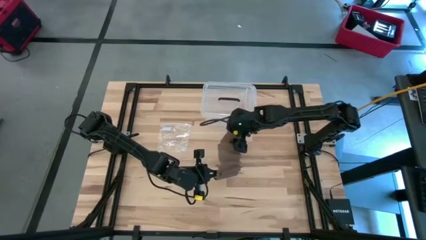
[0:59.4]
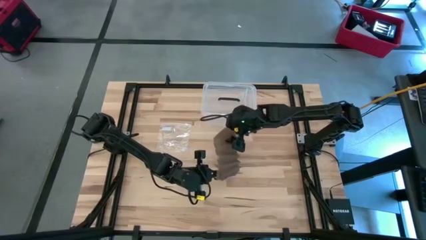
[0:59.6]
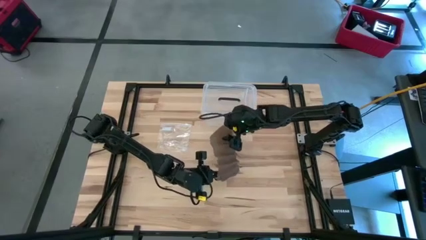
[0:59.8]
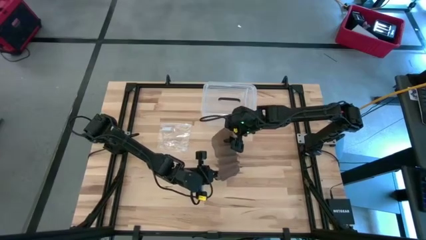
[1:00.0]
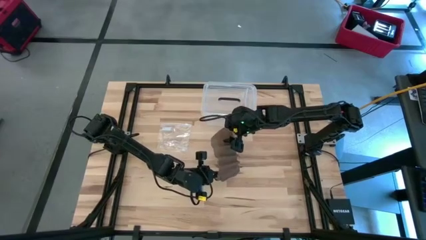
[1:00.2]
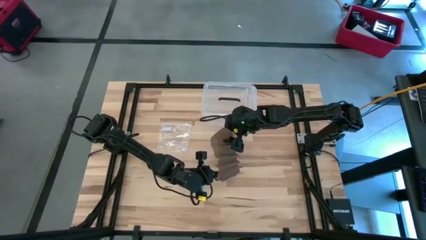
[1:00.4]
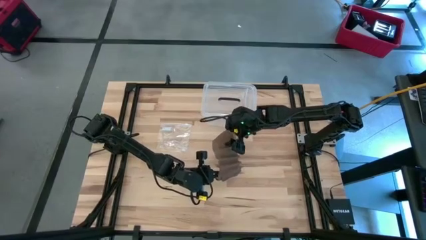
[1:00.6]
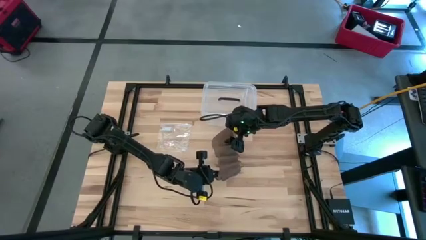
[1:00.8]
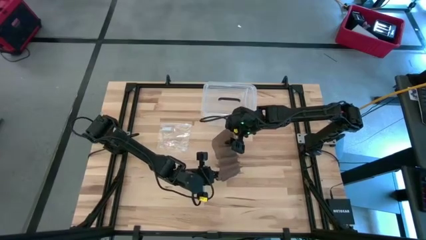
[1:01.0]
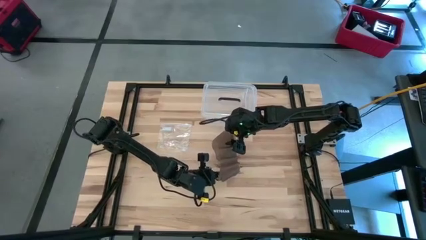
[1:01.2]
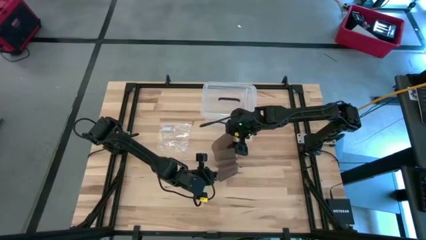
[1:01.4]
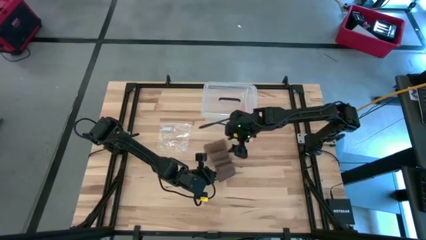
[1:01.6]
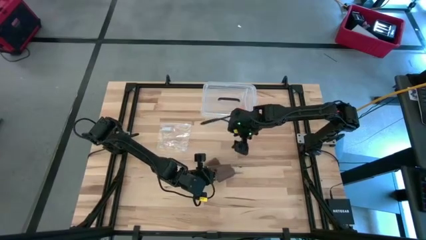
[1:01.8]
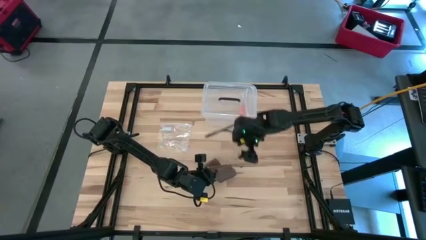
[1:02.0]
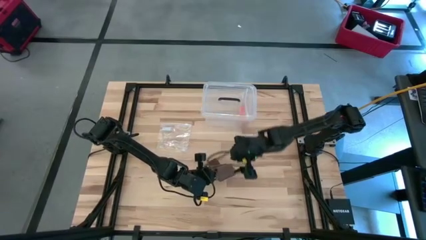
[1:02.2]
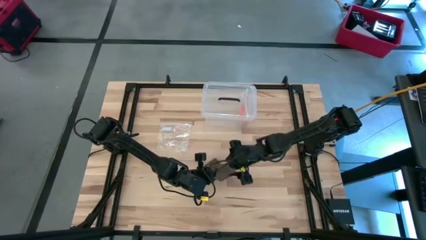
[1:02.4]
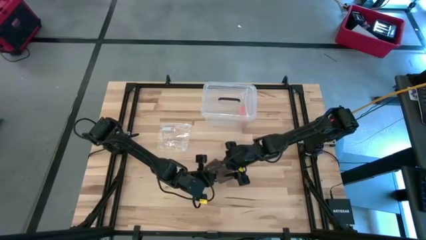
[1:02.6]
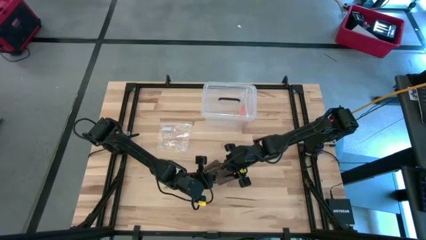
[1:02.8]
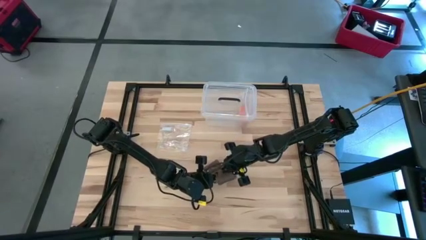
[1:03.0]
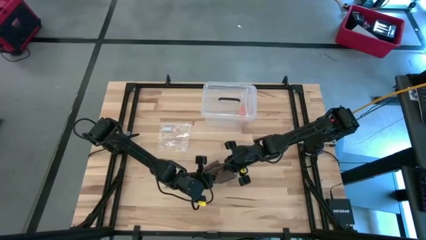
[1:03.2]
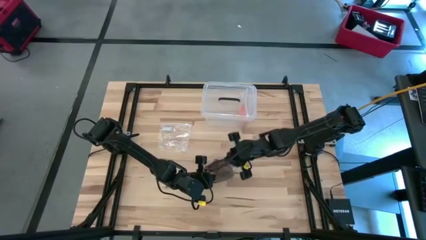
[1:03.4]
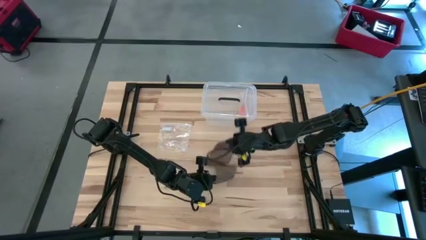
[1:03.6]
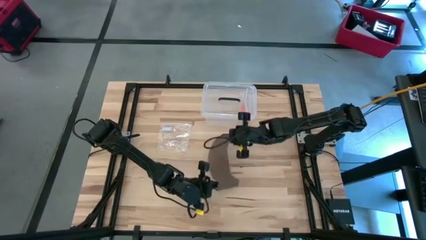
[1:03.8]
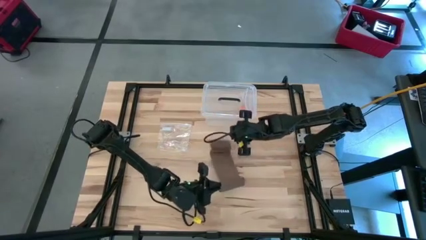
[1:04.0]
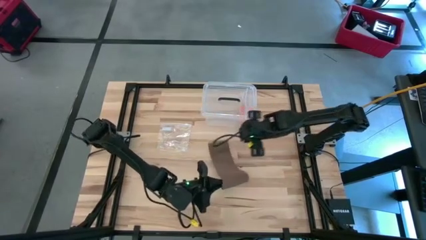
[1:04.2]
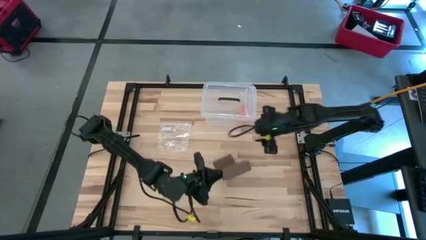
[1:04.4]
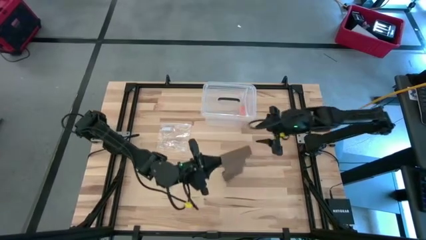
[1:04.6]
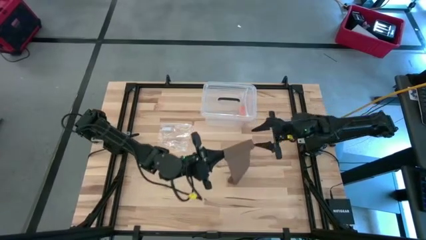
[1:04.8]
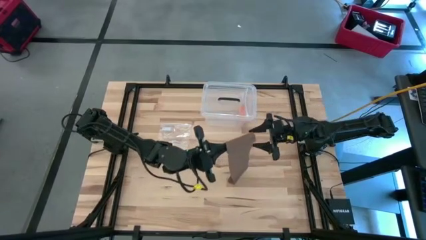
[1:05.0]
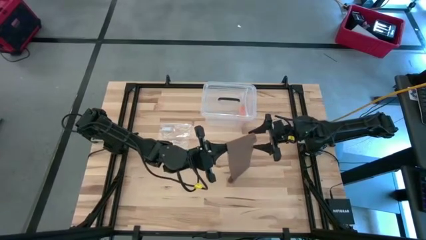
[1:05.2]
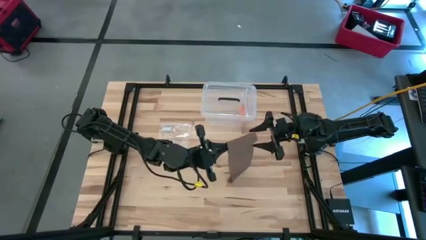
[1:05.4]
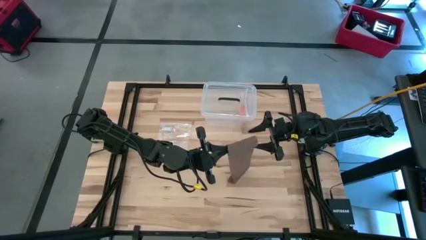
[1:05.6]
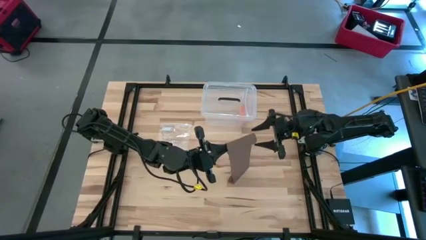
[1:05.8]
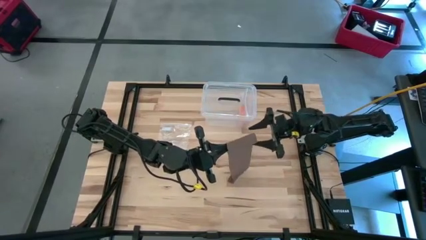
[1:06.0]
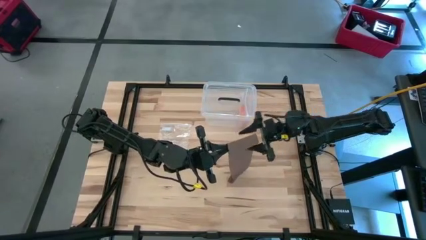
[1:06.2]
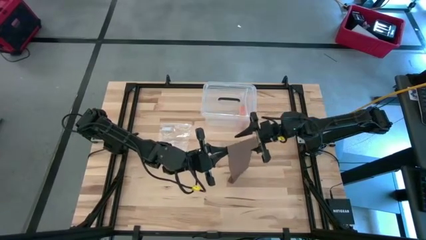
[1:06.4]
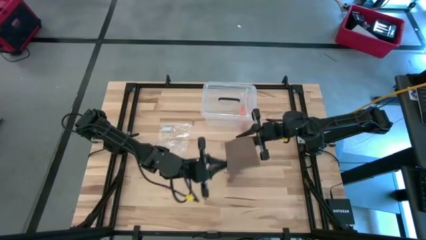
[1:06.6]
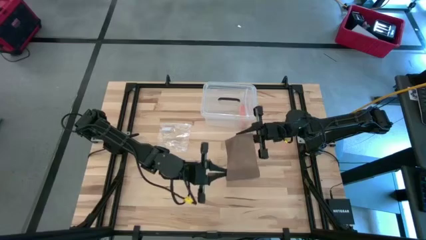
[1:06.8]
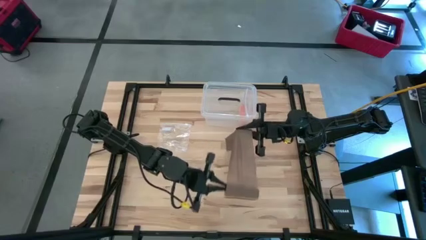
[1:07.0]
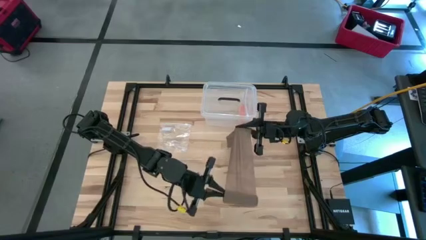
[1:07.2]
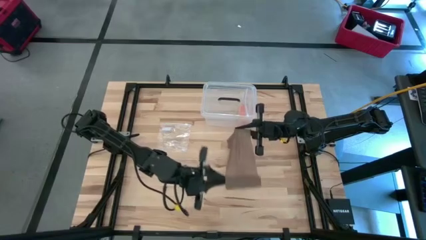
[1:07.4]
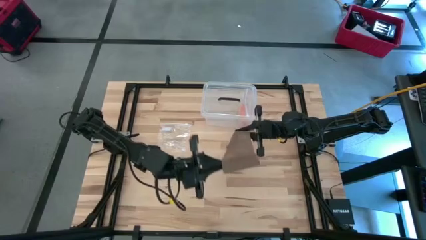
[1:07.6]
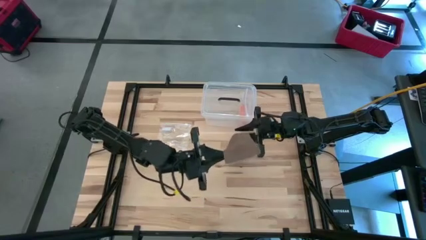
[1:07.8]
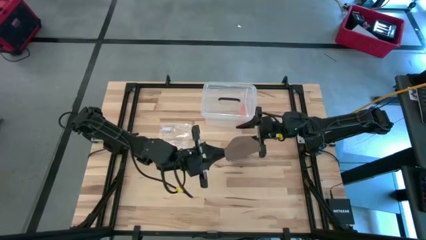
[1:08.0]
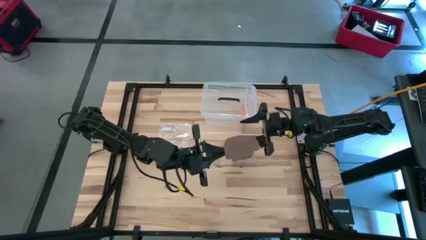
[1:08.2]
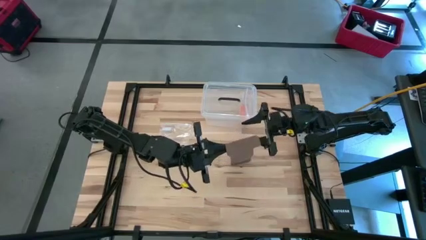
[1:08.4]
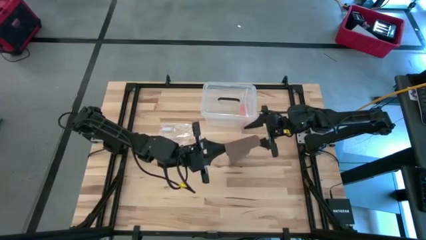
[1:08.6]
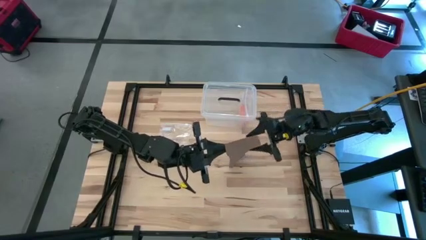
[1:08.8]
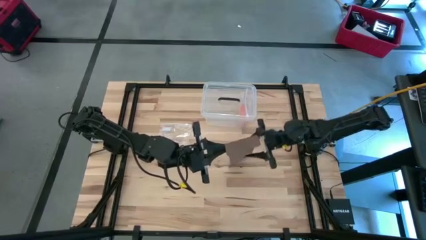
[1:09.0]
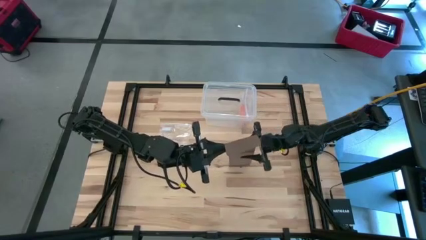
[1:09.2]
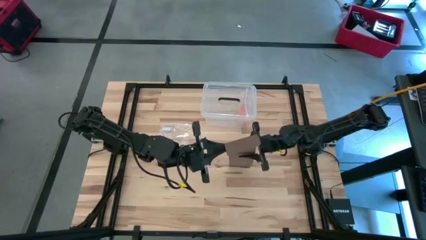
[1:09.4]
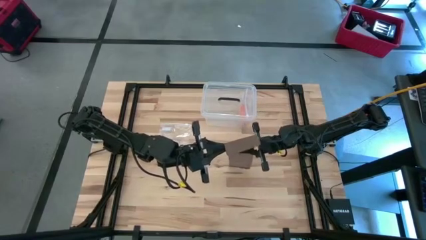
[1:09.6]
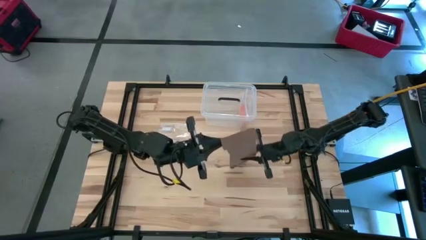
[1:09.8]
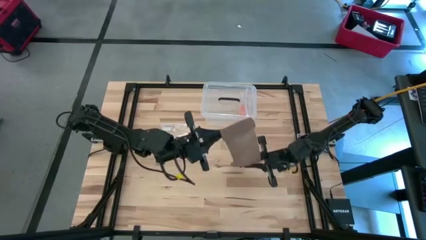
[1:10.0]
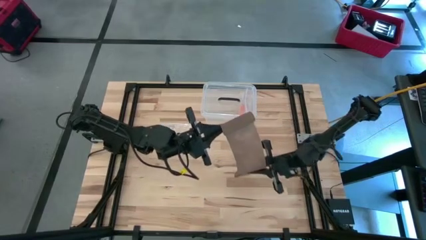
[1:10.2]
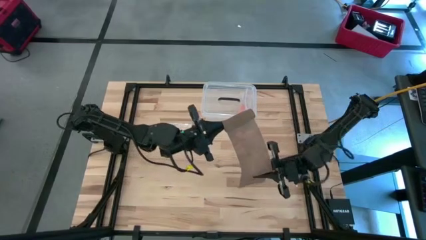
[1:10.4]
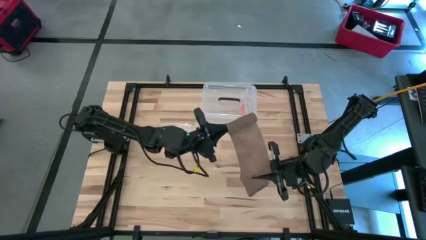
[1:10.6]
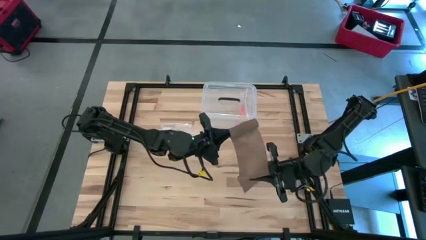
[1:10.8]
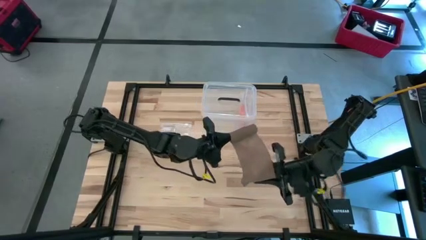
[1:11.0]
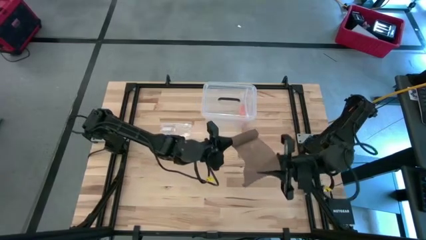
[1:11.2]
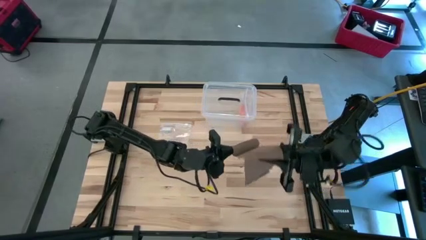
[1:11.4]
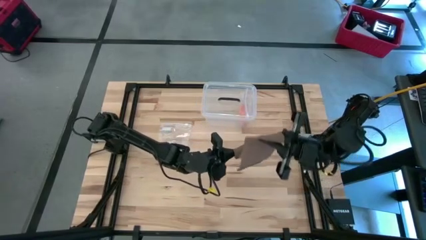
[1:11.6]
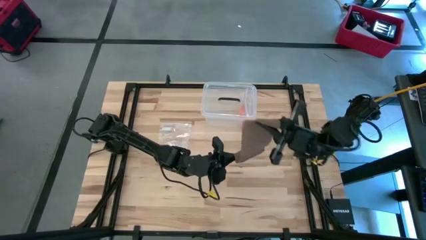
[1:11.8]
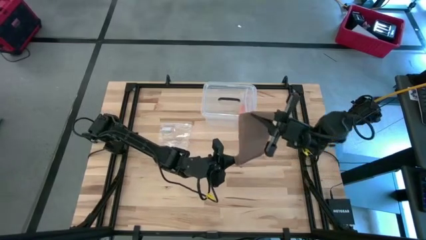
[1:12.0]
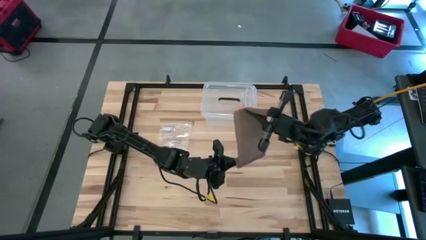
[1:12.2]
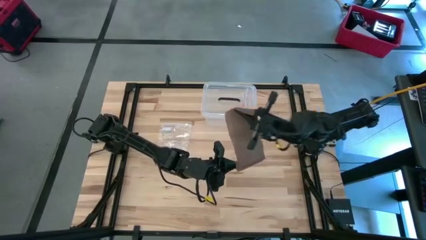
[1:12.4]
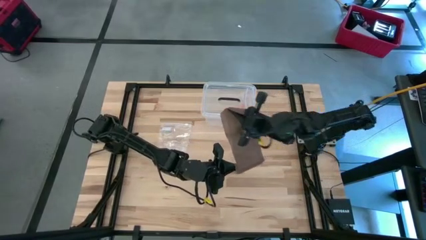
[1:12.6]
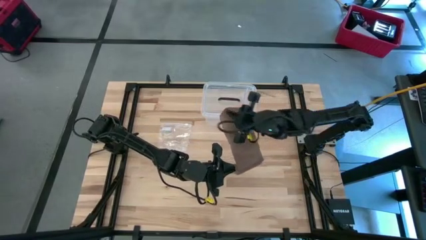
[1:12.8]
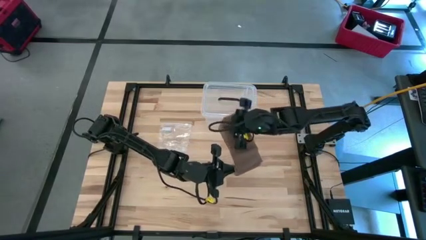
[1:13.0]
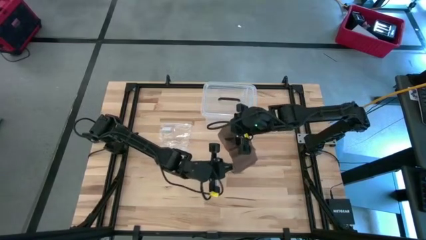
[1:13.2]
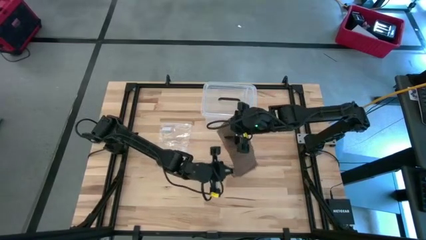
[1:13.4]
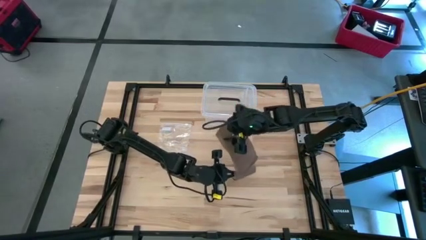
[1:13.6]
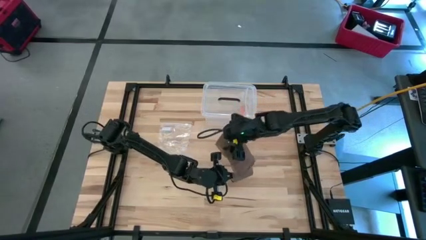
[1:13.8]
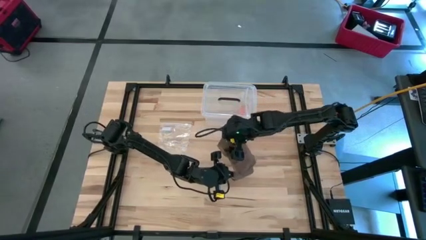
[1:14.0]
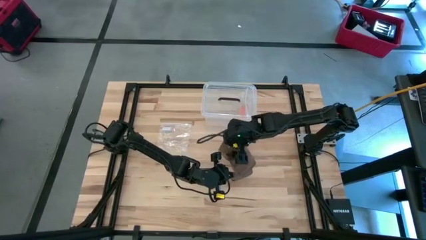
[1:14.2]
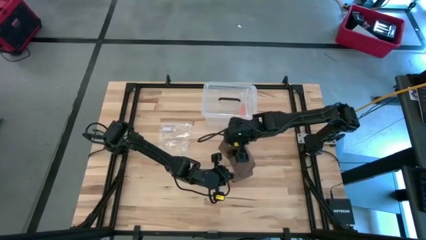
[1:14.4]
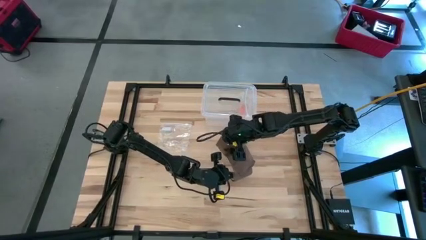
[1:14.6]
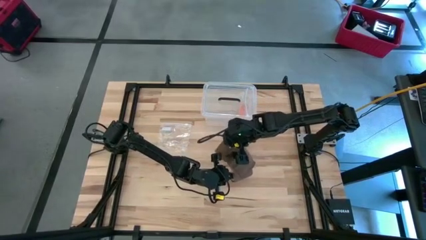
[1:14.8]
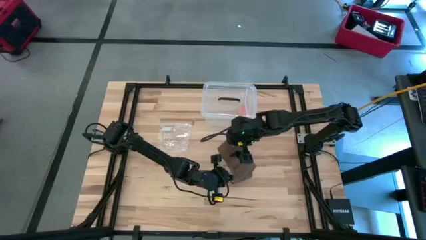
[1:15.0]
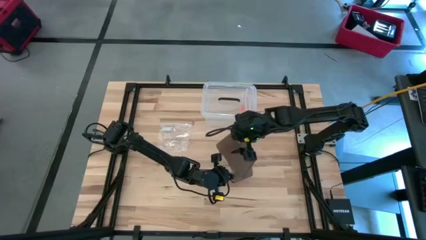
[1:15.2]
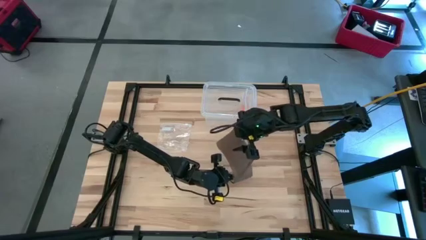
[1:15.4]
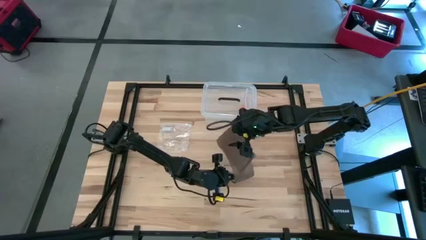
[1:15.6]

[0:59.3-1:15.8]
Task: Roll bandage
Roll the brown bandage
